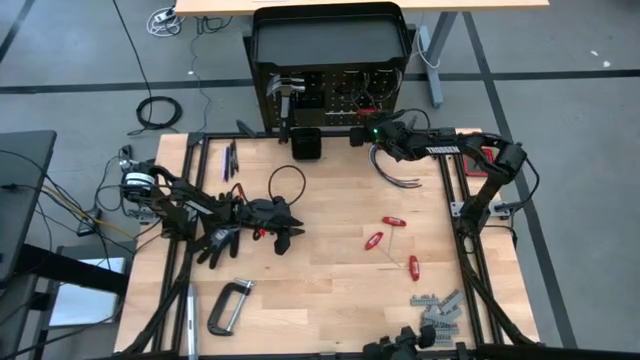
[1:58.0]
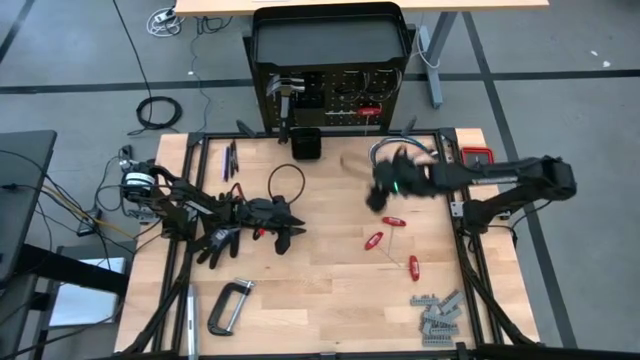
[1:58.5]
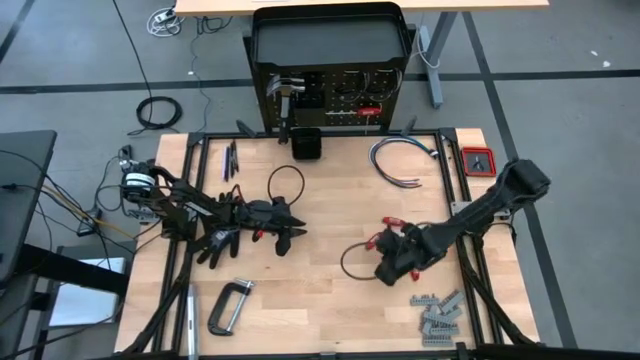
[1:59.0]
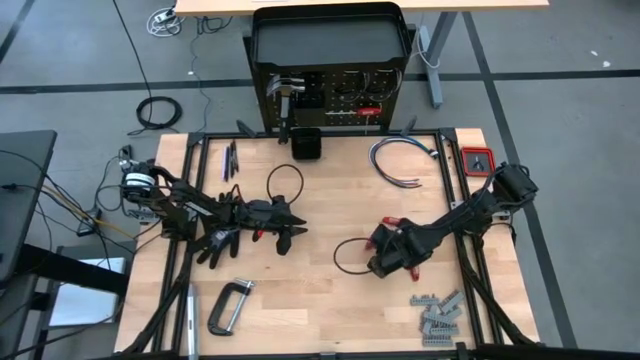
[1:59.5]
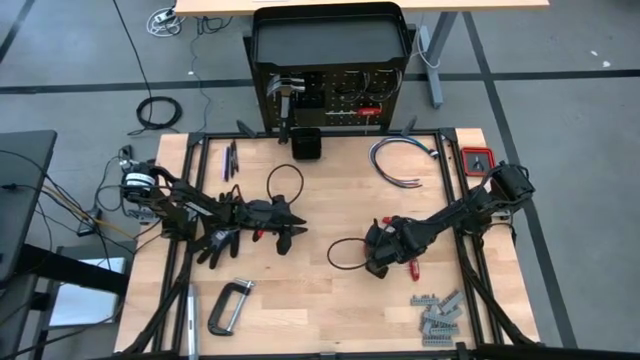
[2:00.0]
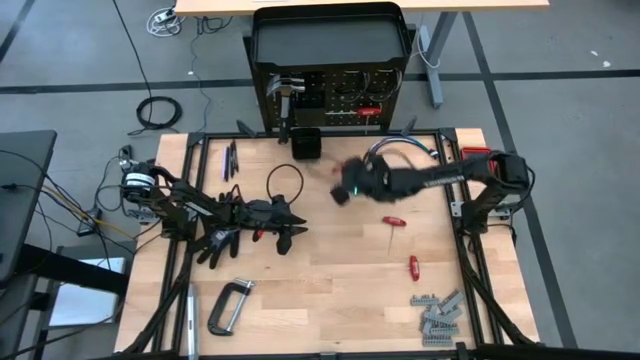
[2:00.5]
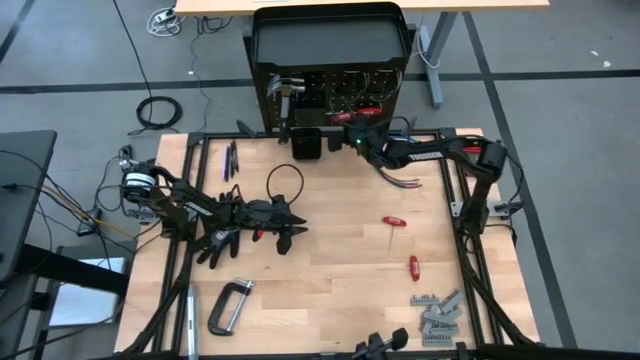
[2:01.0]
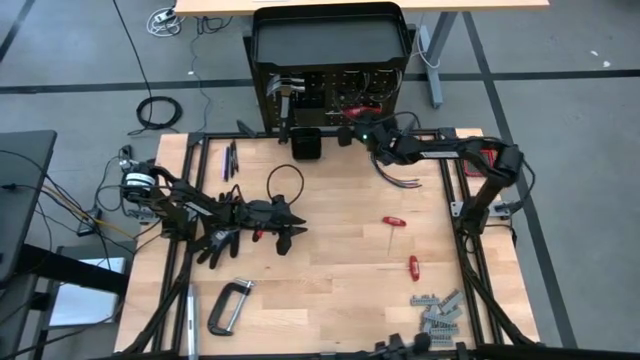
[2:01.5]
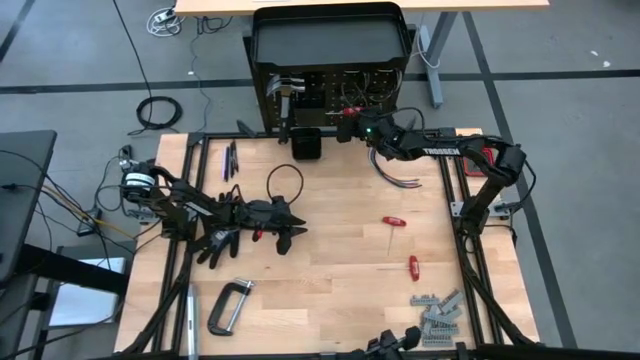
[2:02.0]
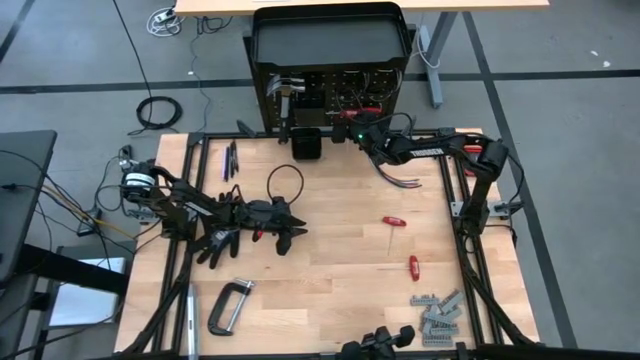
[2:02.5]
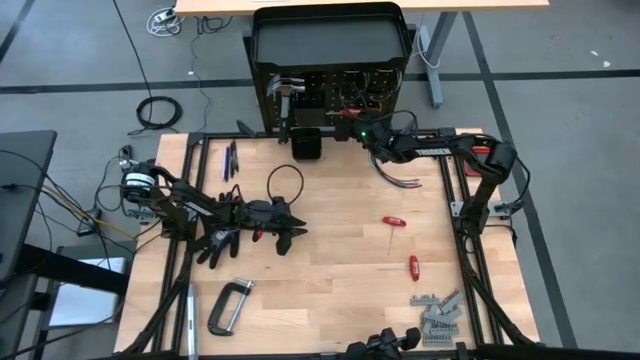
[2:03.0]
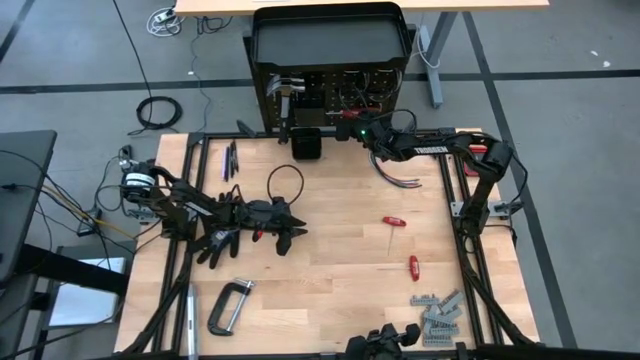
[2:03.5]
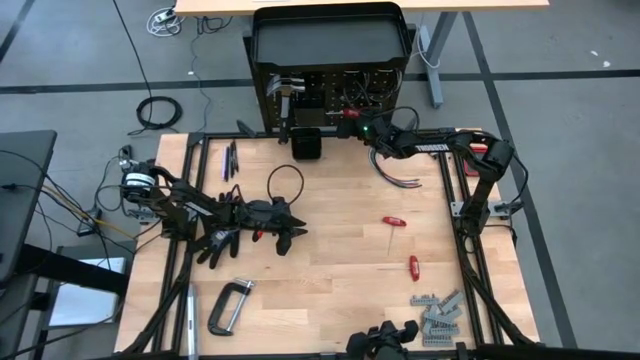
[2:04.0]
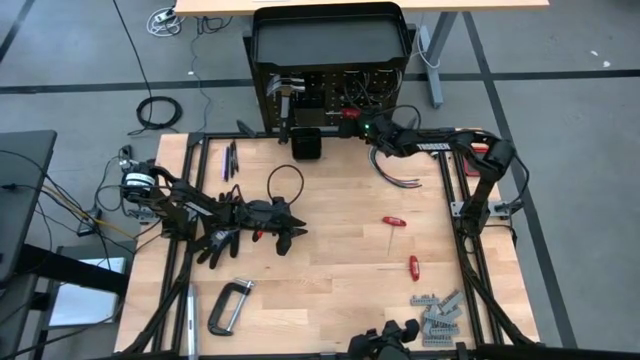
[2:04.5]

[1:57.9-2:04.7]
Task: Hang tools onto peg board
Hang the red allen wrench on the peg board

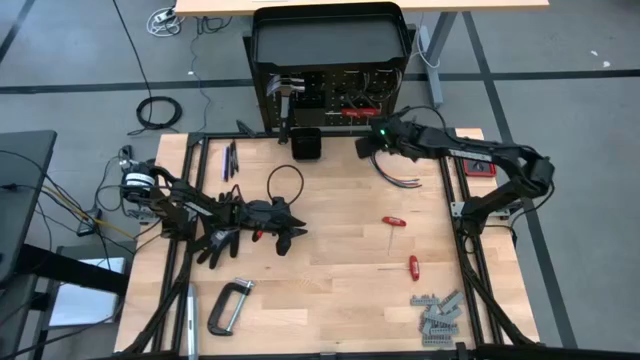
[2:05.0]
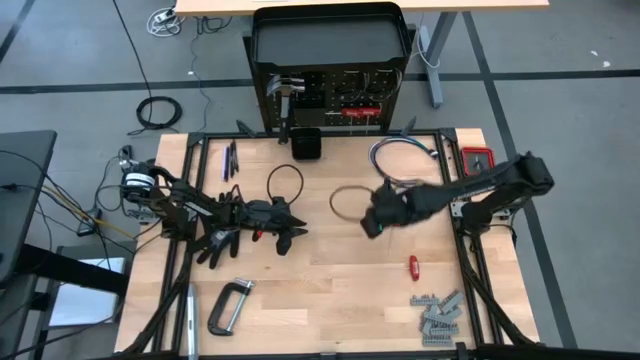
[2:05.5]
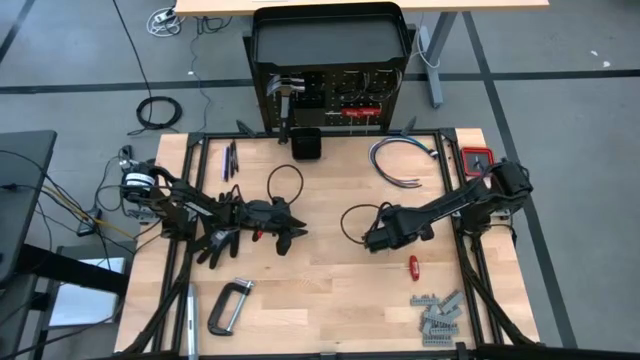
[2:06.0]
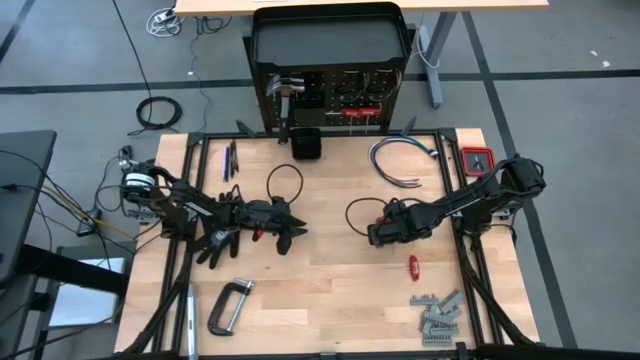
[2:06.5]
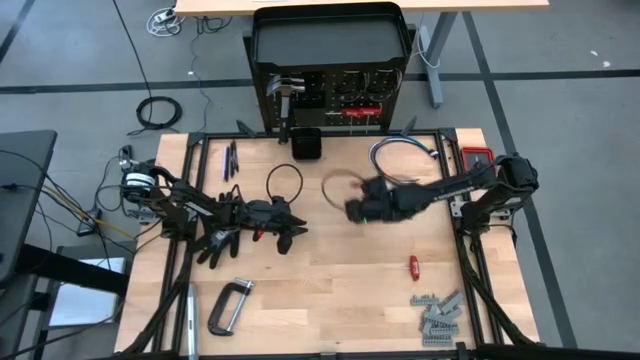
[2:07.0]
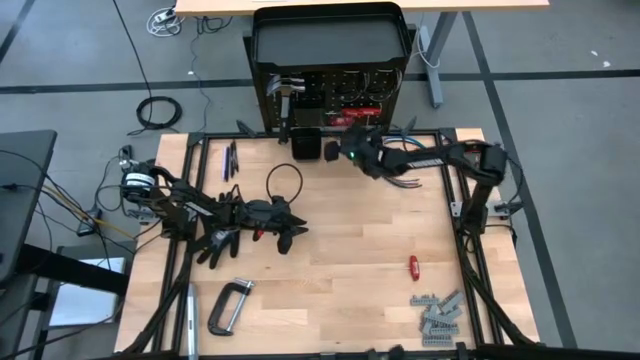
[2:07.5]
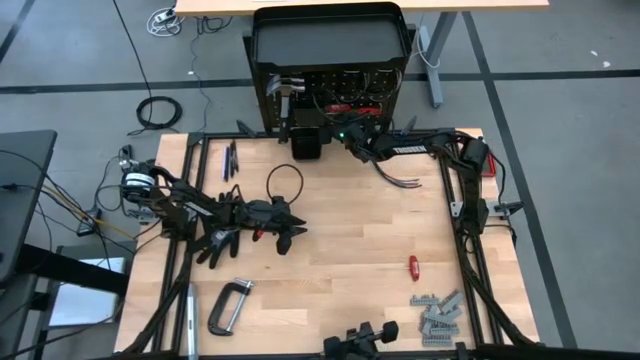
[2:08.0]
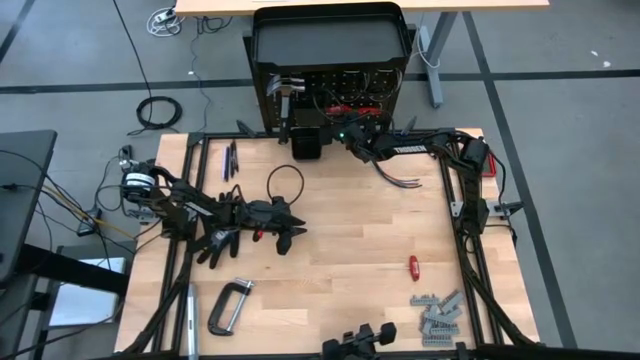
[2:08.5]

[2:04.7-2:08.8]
Hang the red allen wrench on the peg board

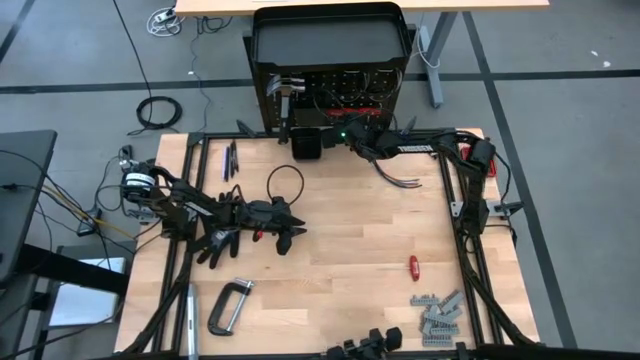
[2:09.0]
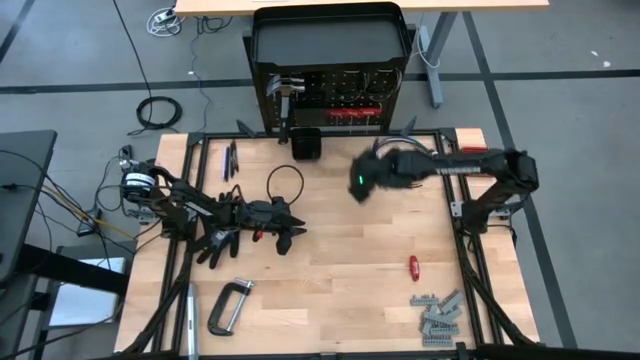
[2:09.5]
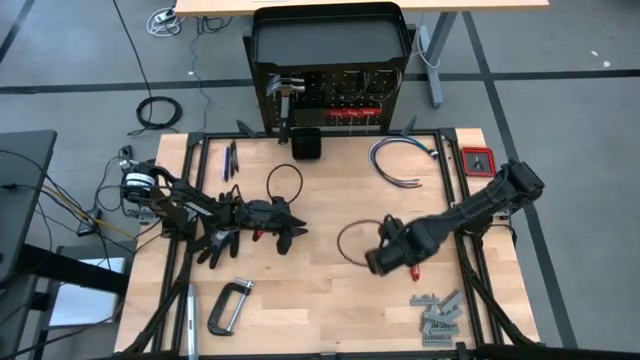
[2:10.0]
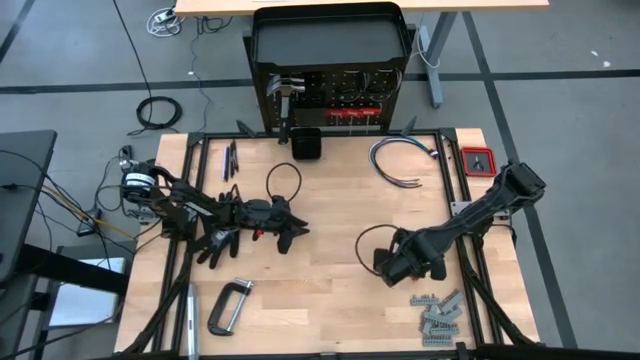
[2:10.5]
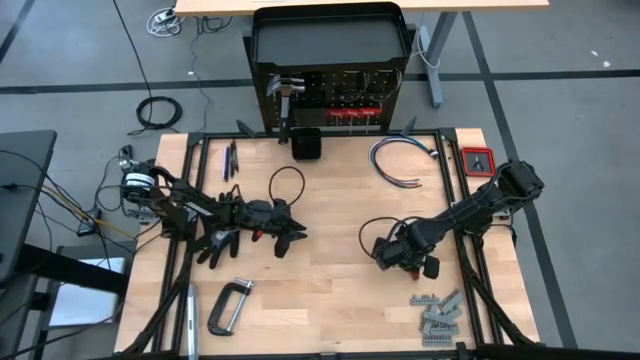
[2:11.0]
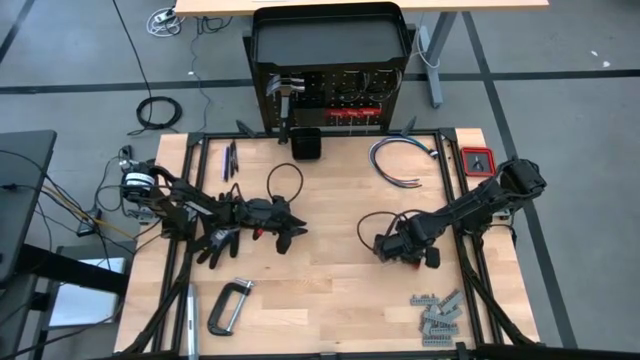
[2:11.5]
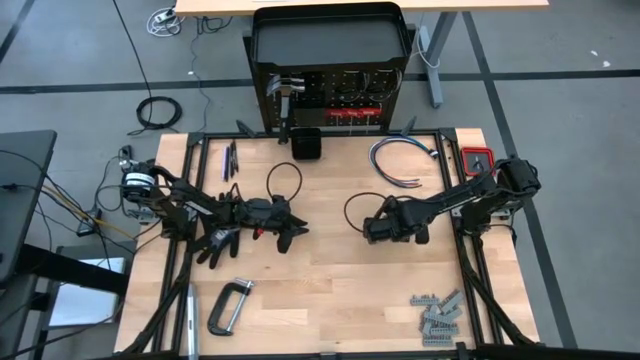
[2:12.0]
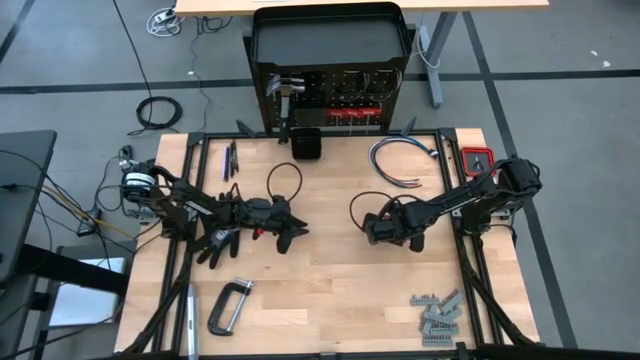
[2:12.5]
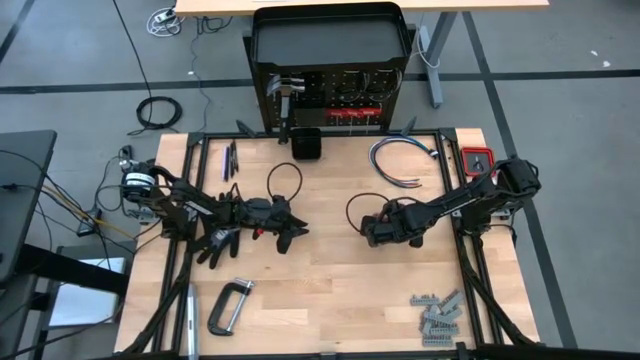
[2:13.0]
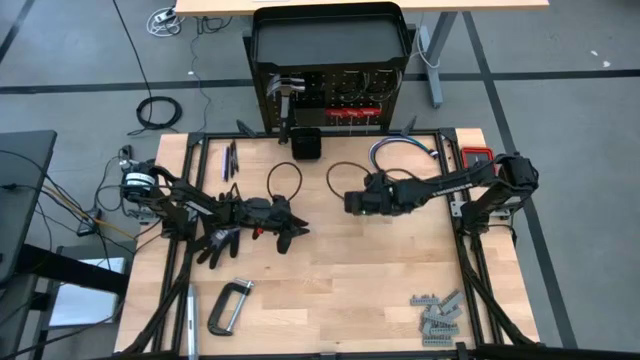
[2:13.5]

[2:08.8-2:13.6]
Hang the red allen wrench on the peg board
